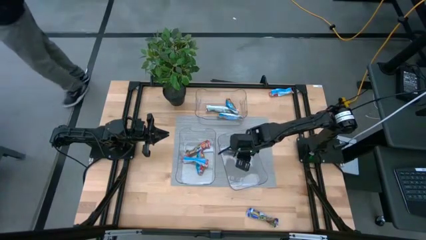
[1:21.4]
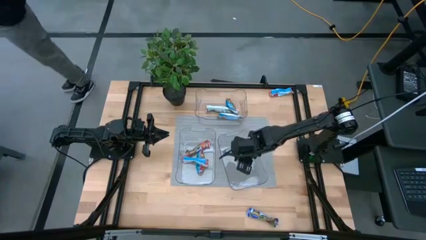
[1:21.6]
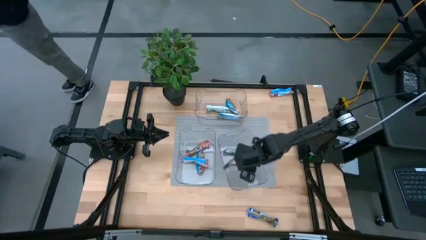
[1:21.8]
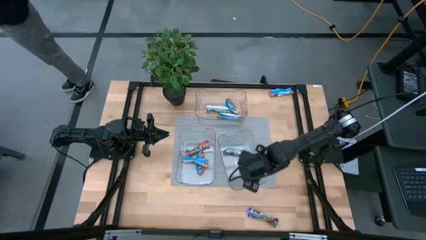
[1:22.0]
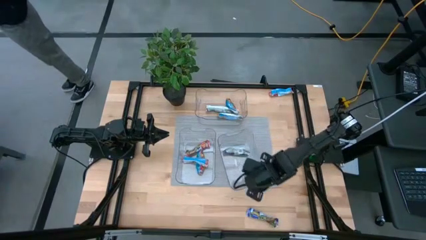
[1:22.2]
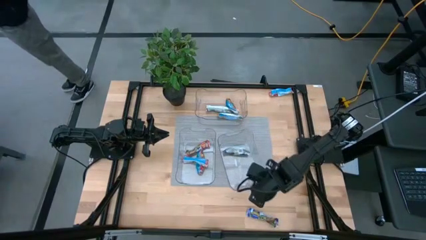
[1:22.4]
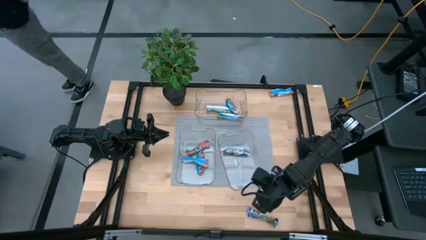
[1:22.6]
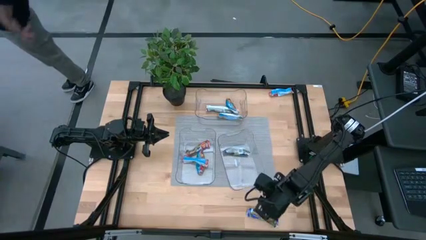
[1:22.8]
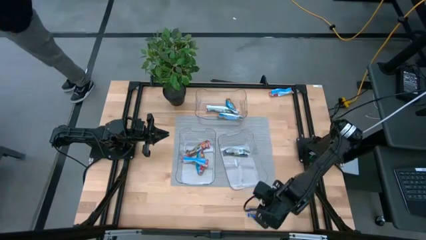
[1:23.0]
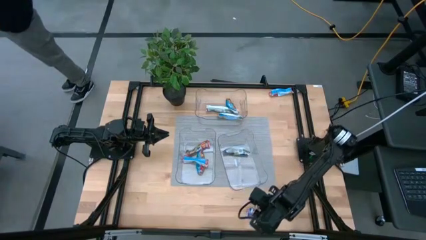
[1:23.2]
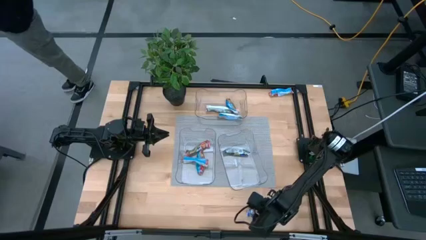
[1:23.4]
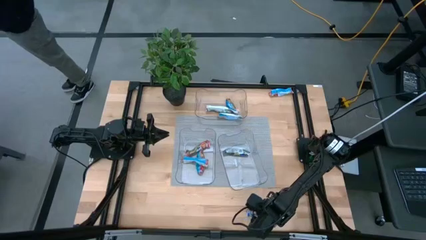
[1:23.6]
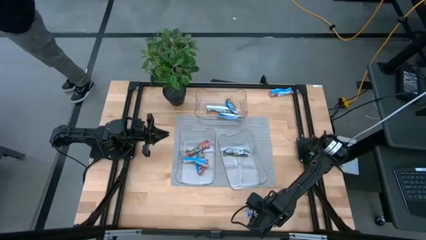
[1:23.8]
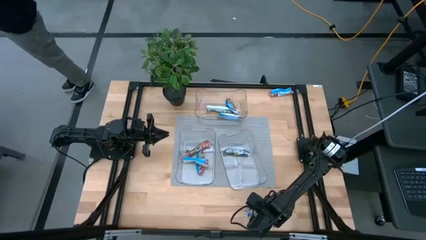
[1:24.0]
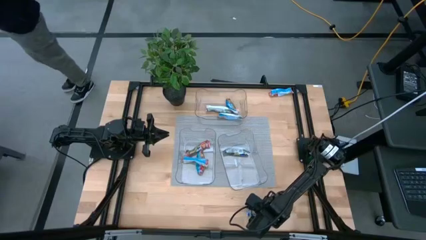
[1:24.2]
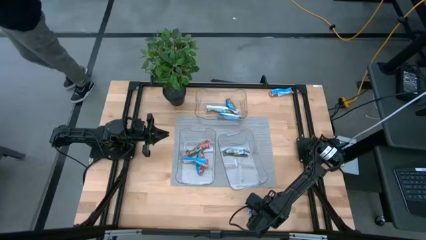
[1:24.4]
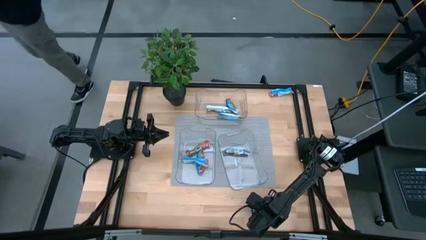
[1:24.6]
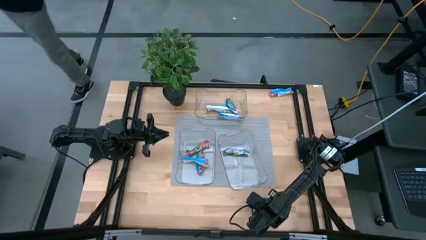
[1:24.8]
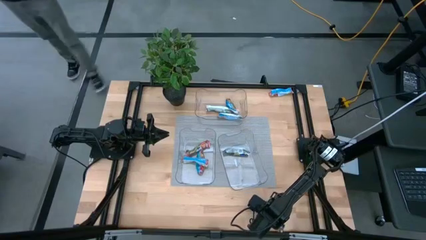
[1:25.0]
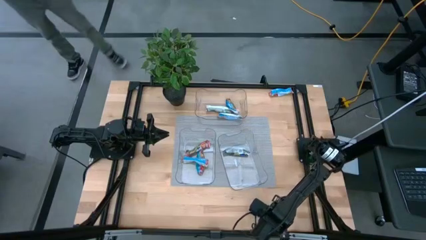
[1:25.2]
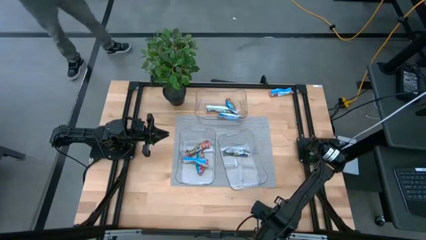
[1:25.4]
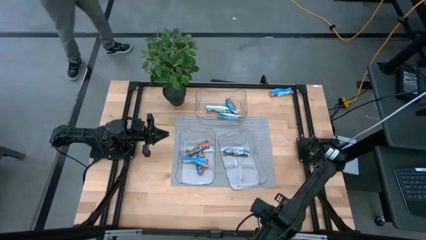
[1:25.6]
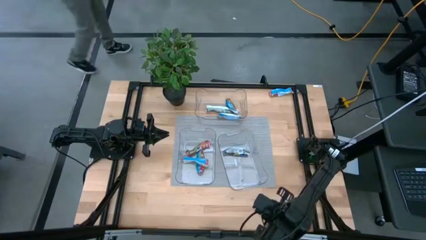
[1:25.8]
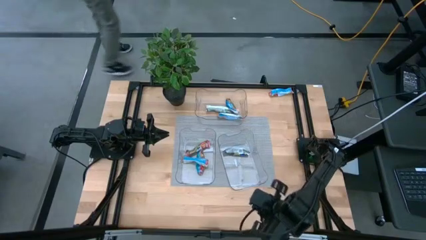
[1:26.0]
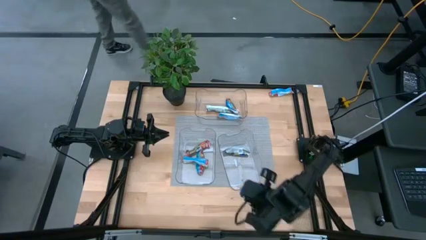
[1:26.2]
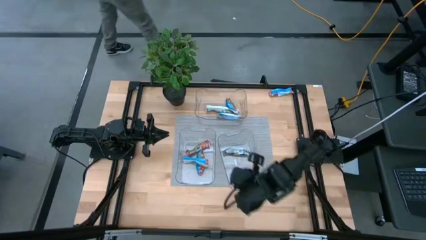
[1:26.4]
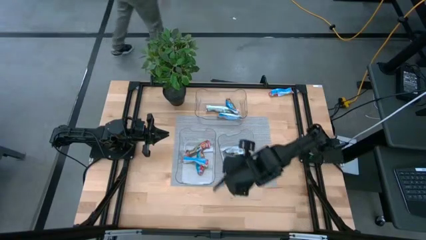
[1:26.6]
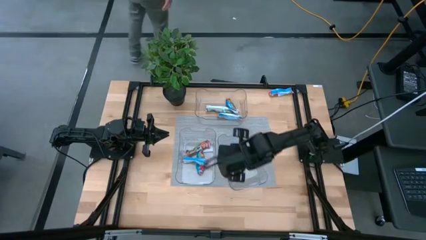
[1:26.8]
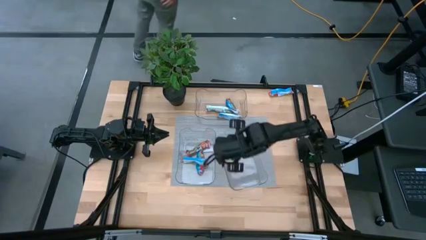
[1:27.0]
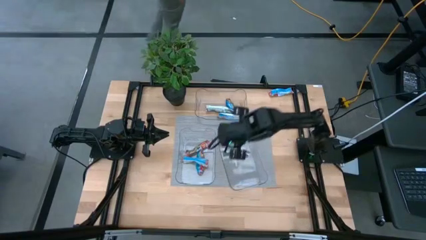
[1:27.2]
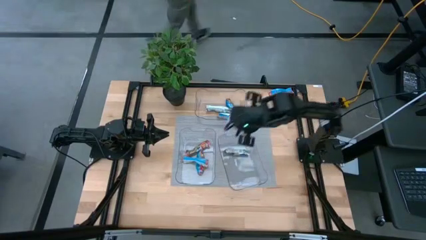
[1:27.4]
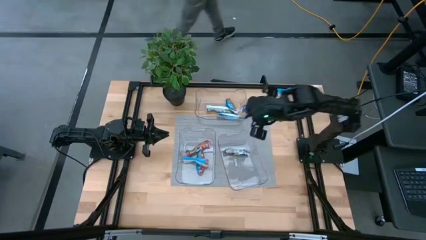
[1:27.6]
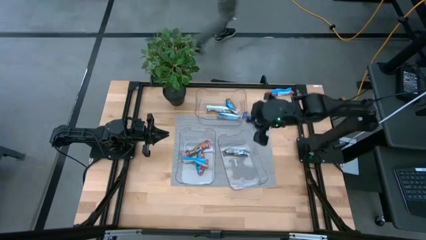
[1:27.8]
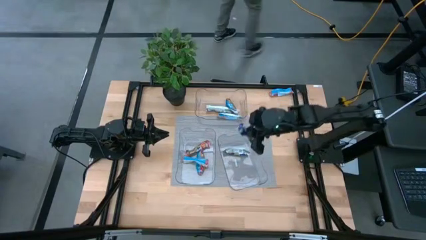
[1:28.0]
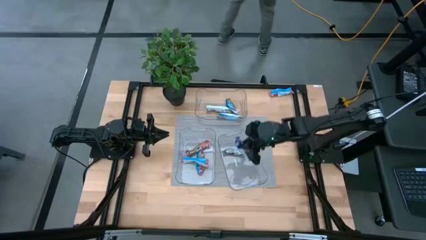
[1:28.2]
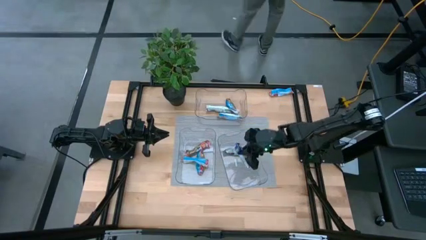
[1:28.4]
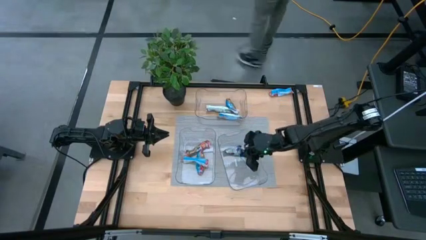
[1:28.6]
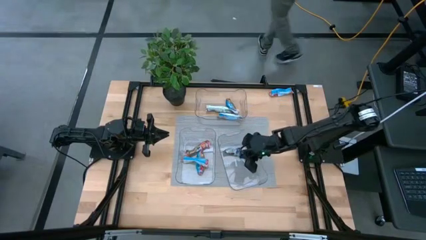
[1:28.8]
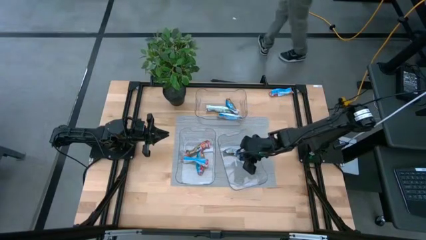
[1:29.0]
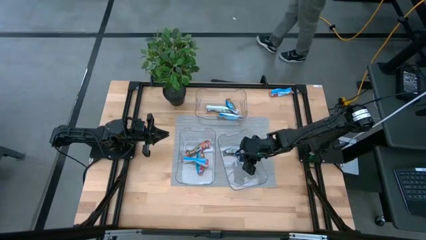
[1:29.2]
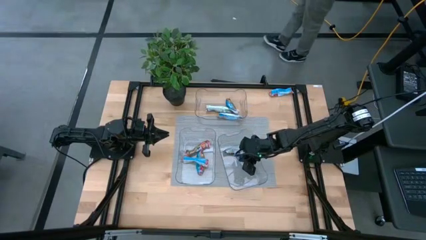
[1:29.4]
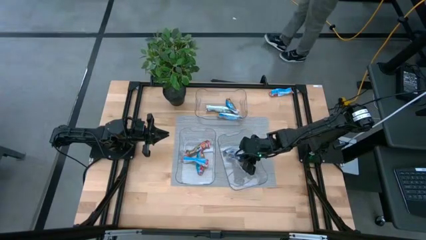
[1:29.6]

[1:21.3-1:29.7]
Task: Pick and place Granola Bars by type
Put the blue granola bar into the bottom right transparent bin

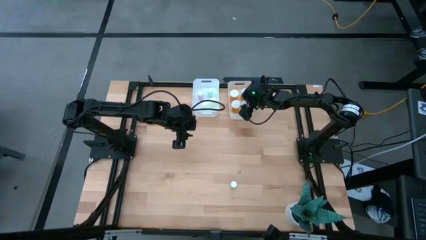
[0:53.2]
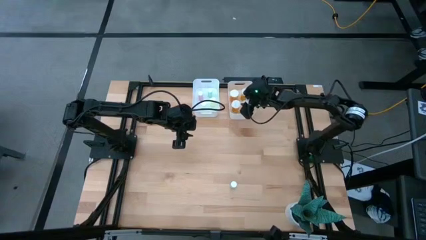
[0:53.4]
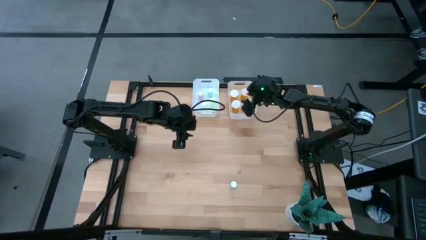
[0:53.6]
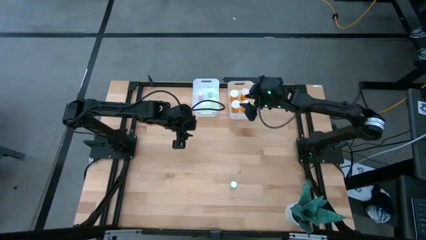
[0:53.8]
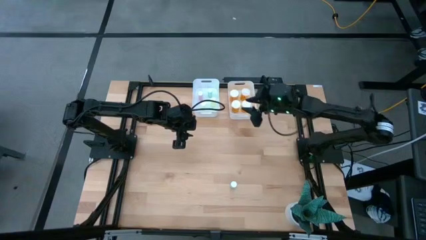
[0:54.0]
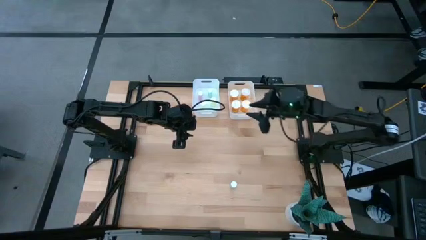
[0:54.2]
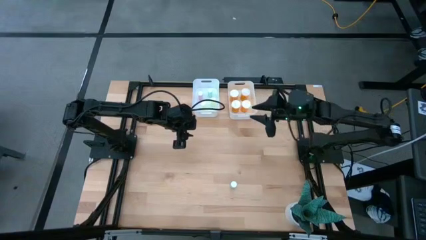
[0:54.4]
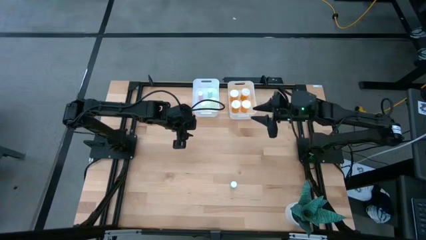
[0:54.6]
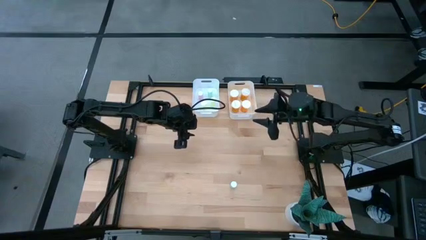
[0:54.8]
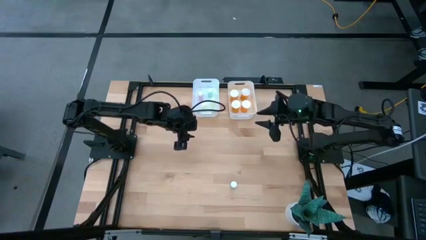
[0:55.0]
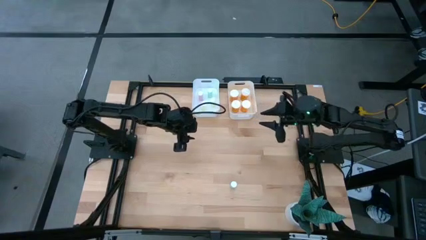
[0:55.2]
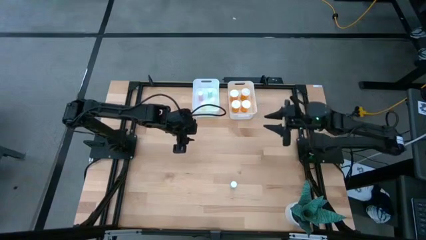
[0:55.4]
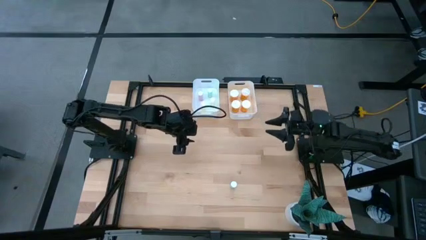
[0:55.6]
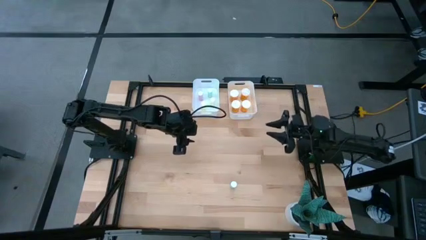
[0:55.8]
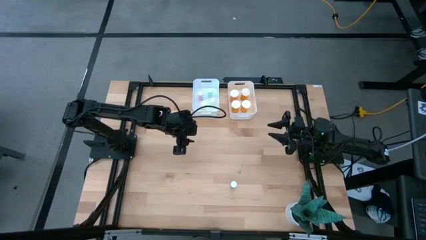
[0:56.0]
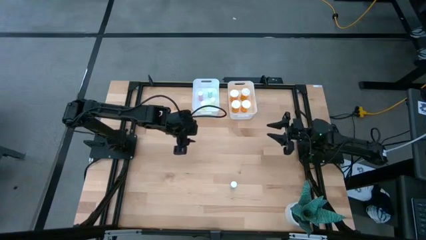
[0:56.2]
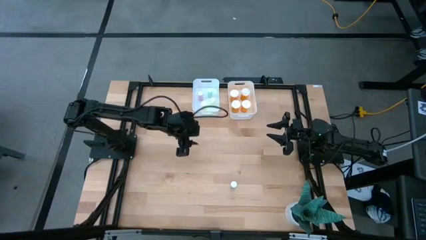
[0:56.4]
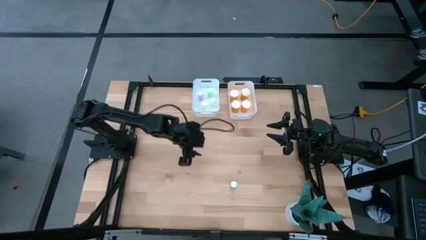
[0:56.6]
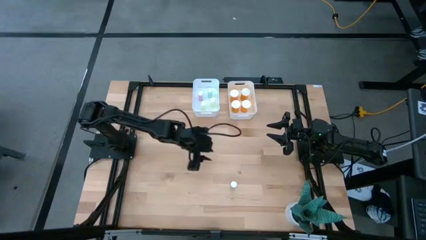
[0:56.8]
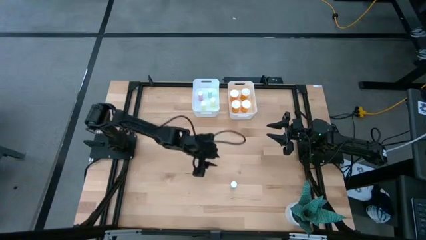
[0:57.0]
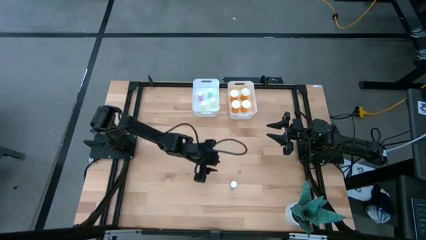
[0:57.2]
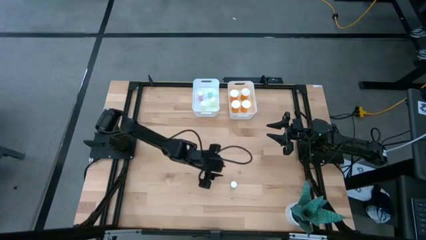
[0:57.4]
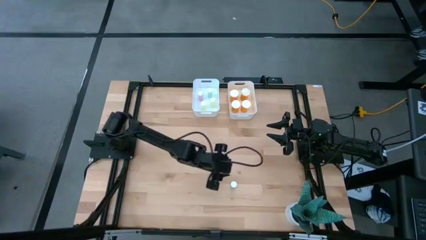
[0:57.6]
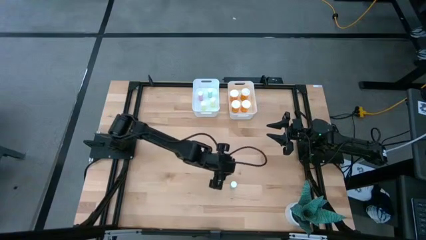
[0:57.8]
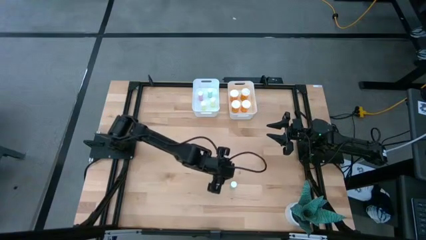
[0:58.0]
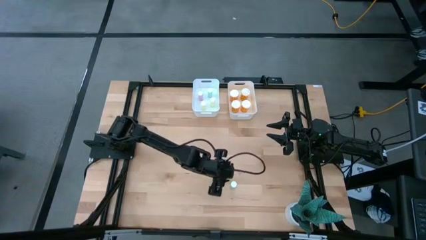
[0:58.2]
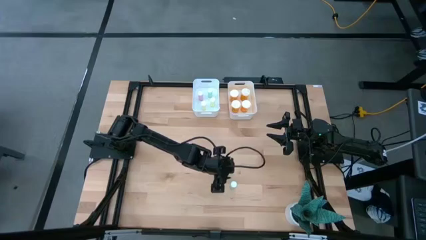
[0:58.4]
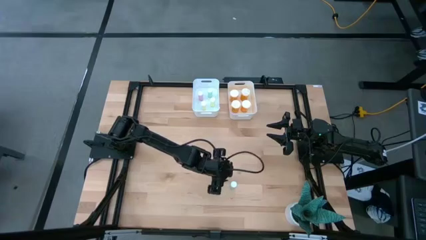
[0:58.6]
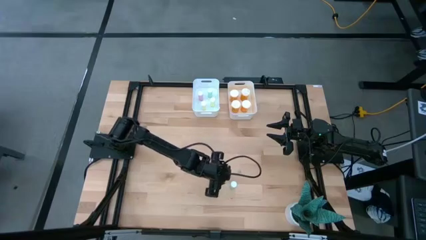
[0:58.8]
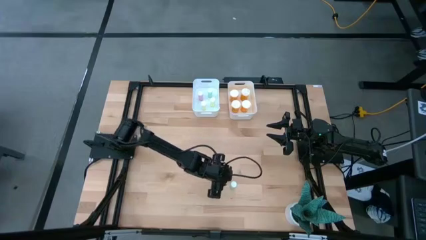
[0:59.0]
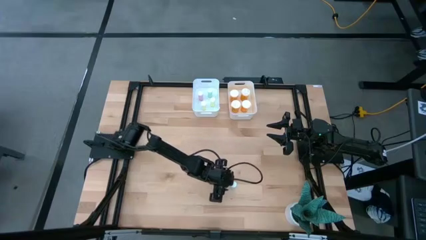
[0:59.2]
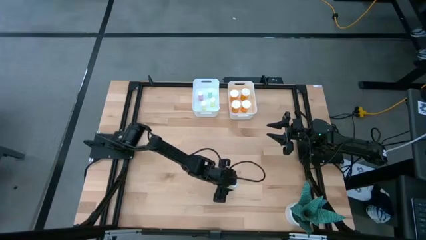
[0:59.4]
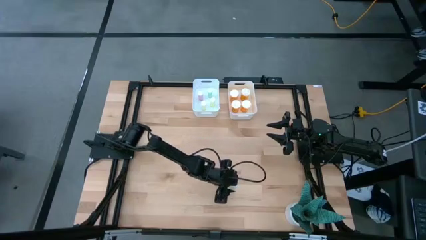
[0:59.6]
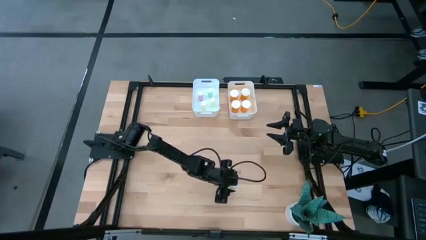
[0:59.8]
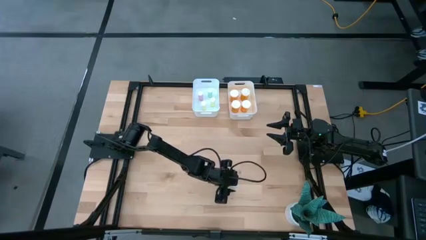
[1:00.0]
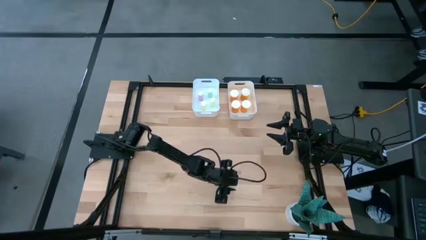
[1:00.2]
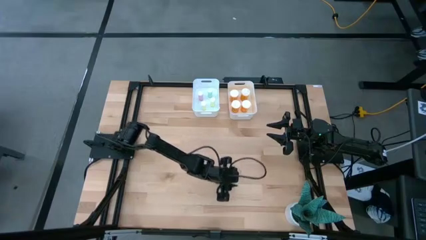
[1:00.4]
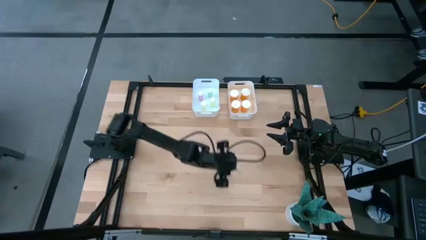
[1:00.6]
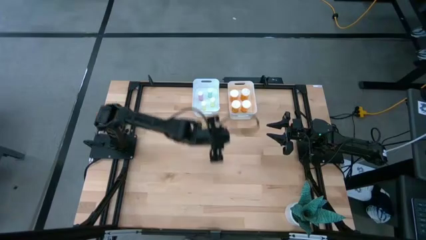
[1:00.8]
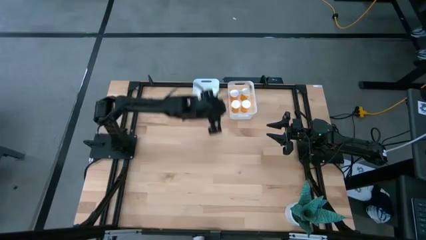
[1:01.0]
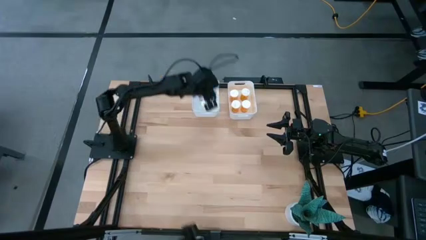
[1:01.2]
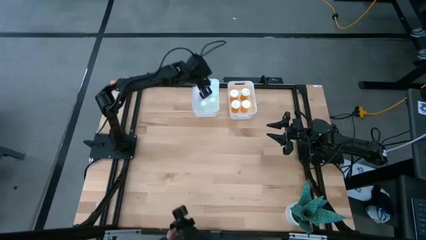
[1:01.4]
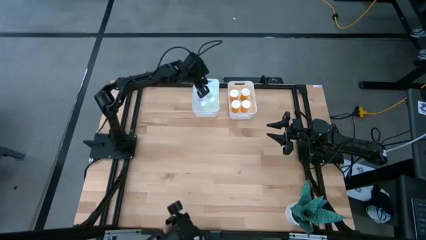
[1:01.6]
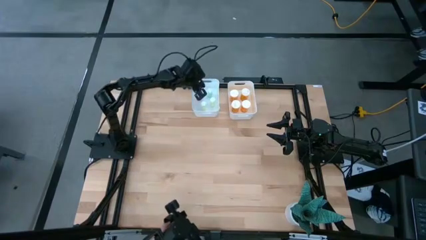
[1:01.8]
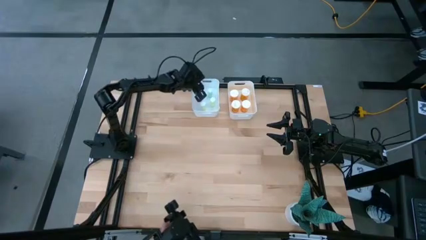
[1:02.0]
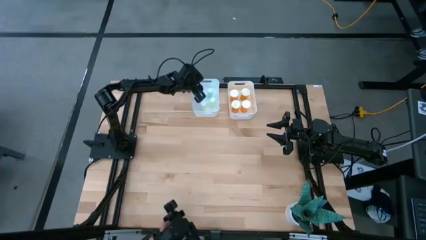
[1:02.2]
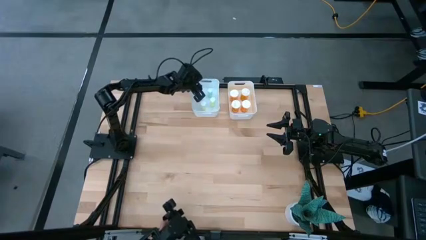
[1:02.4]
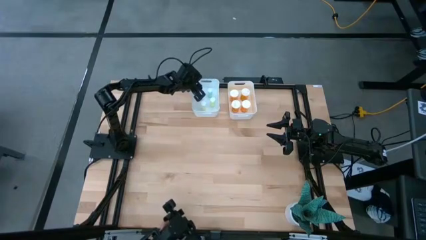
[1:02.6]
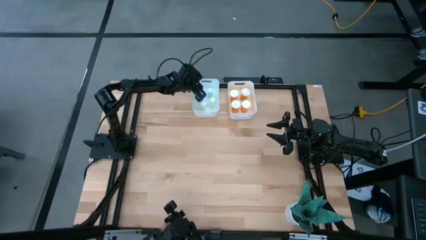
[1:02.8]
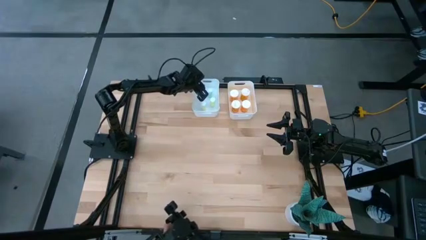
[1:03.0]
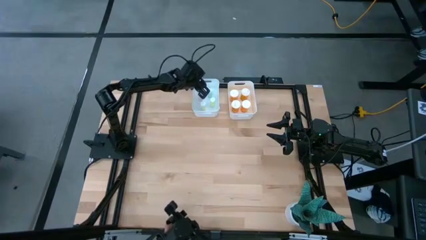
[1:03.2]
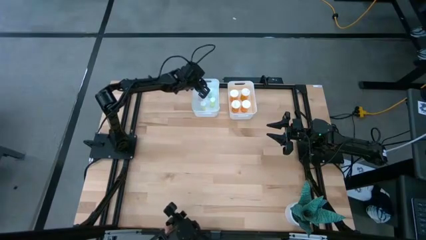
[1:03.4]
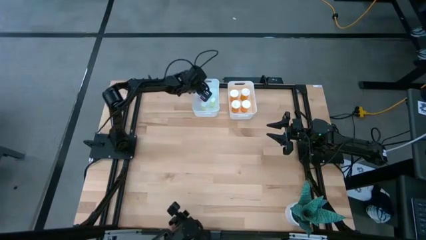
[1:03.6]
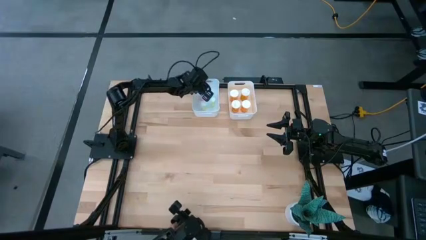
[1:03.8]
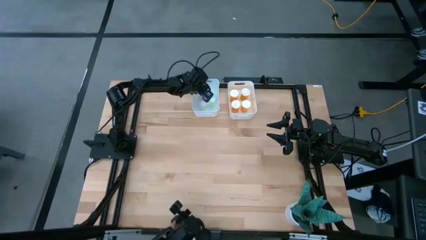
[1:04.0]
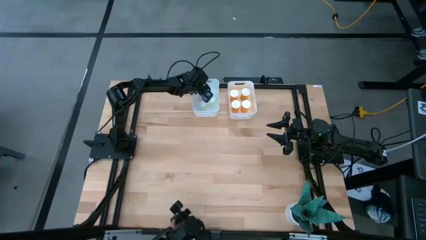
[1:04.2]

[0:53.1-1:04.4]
Task: Pick and place medicine bottles into bin by pill shape (circle, oval)
Put the blue tablet bottle into the white left bin
